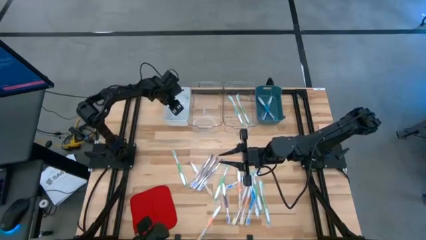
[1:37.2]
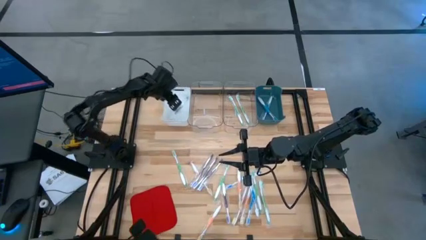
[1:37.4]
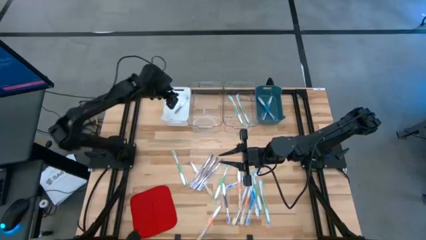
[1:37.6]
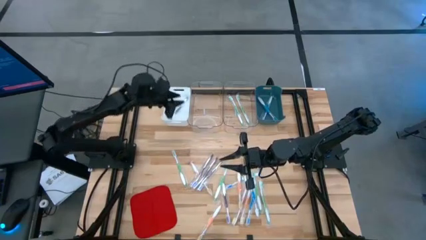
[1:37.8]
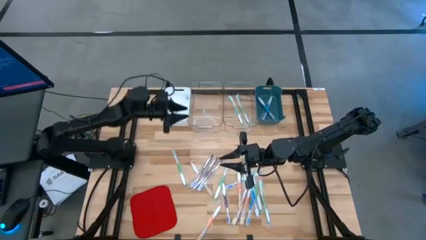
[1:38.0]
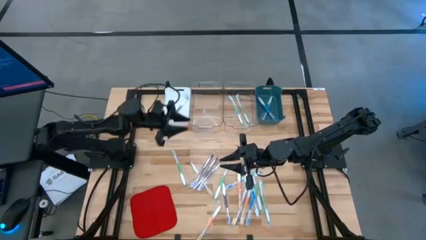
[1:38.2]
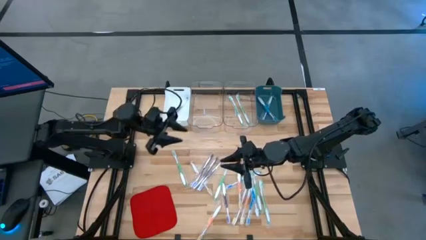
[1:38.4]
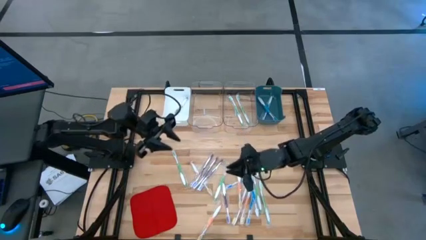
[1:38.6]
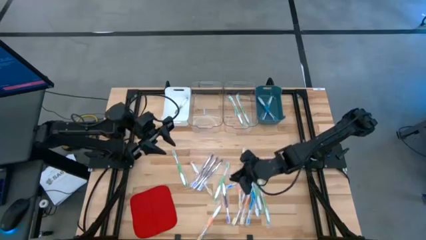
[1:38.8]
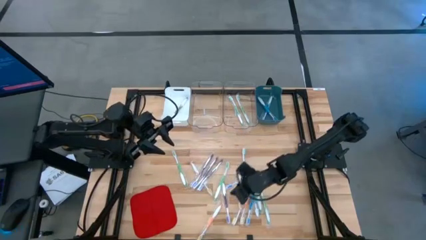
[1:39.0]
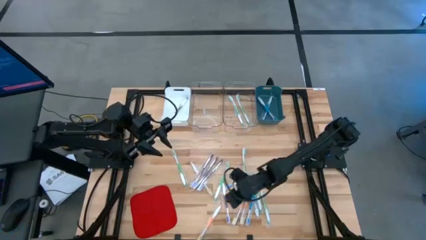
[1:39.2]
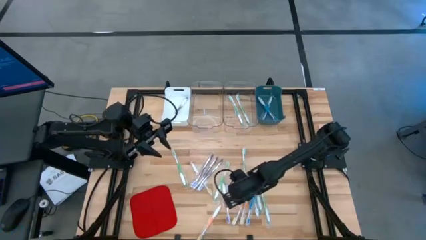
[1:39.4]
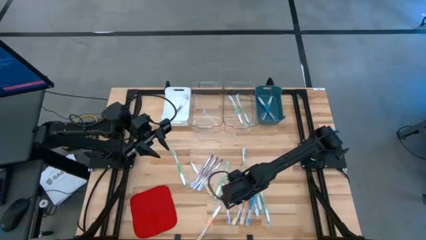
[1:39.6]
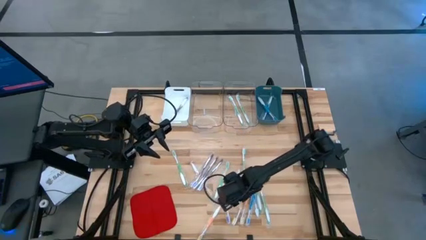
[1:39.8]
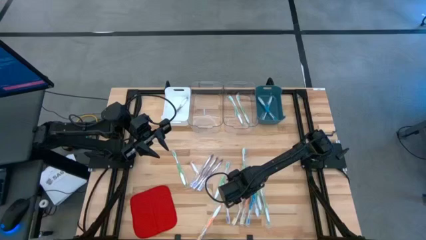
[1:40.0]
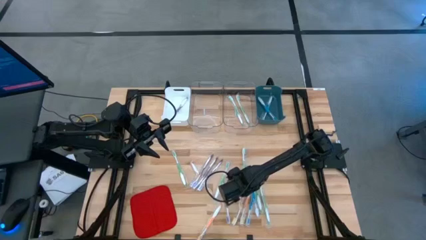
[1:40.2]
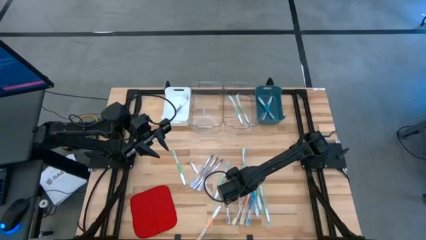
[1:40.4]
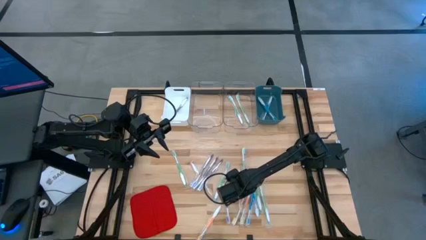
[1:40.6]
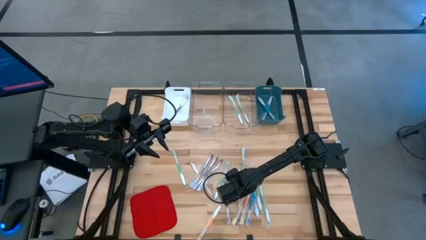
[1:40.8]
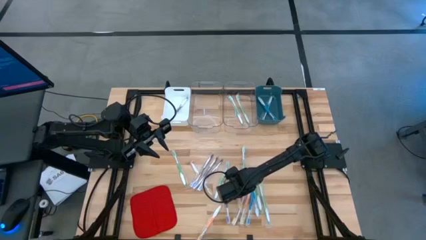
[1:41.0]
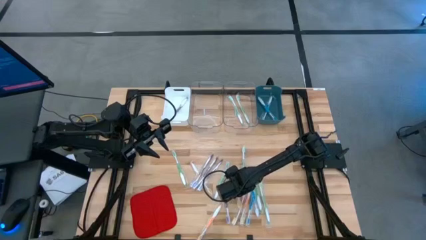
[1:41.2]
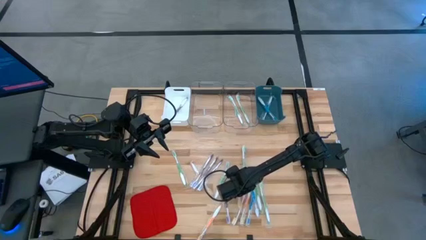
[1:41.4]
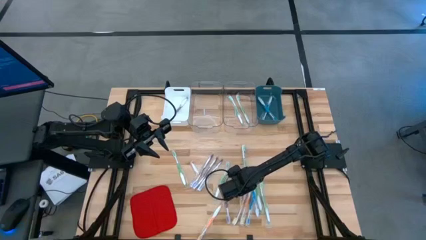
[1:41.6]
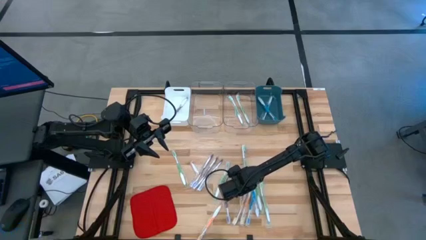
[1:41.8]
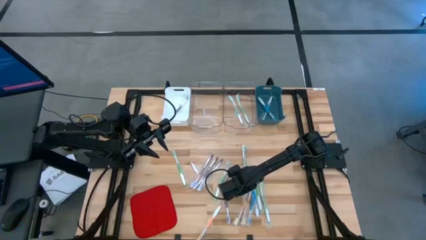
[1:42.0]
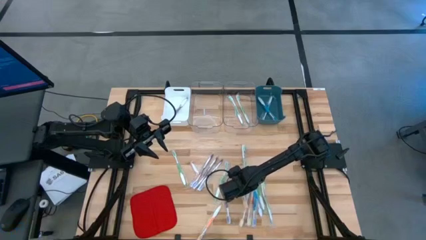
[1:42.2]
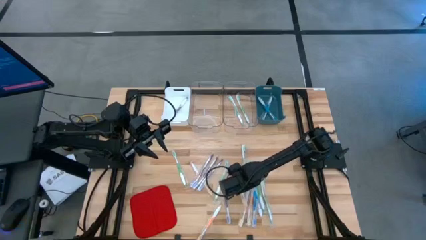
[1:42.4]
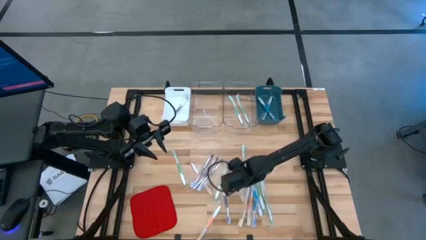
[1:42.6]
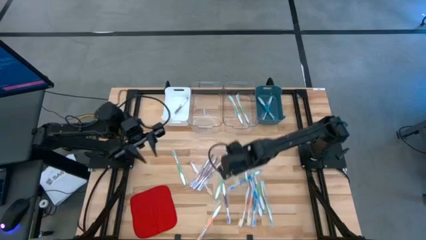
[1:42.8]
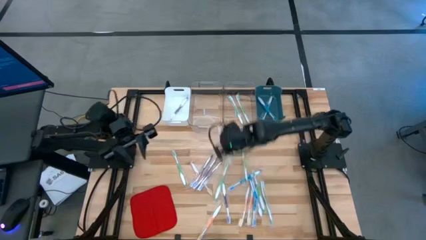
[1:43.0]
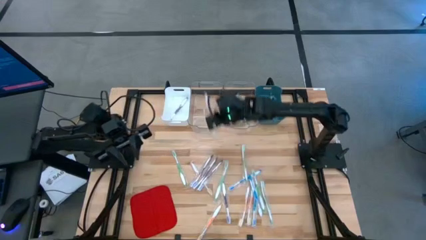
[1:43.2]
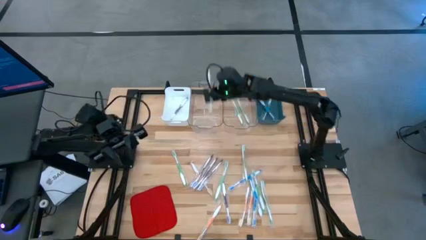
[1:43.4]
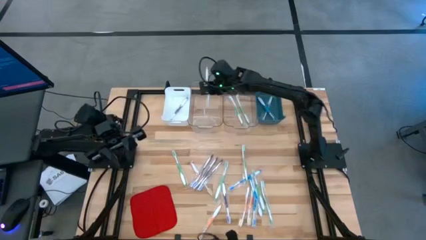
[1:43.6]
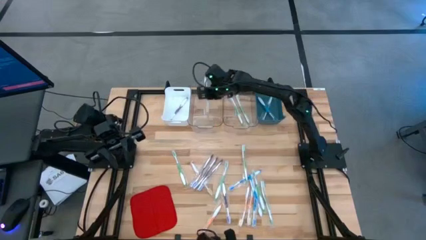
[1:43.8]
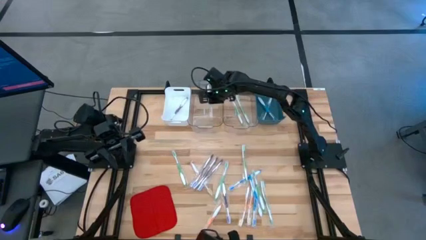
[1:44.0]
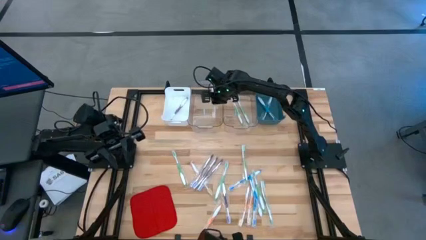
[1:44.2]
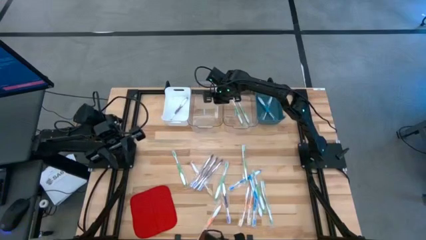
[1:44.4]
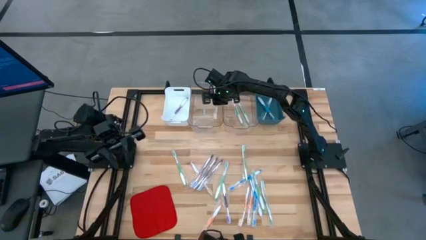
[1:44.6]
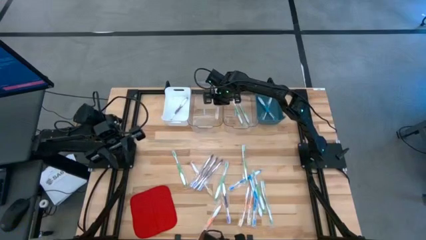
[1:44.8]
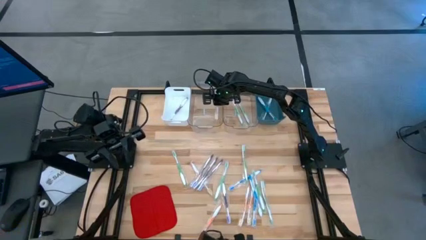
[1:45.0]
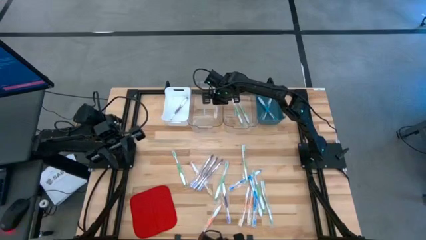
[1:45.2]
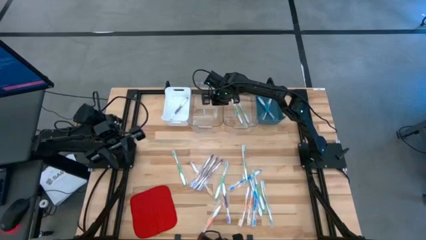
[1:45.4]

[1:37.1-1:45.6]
Task: Pick & Place Toothbrushes
Put the orange toothbrush into the left transparent bin

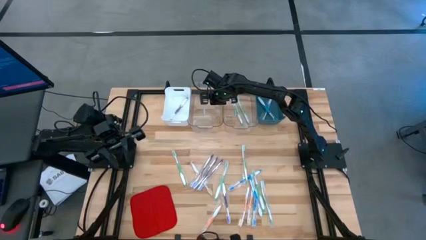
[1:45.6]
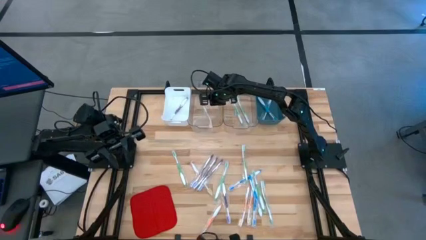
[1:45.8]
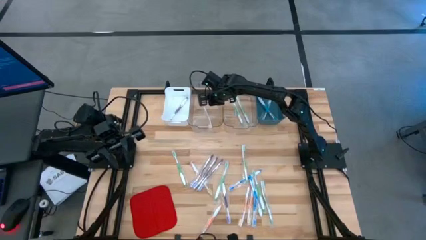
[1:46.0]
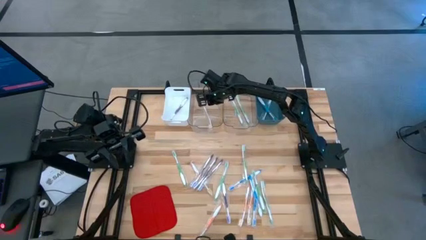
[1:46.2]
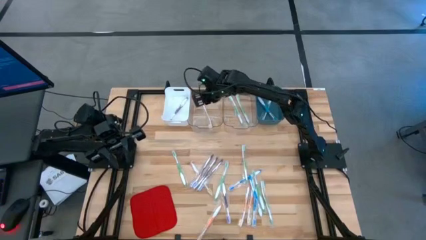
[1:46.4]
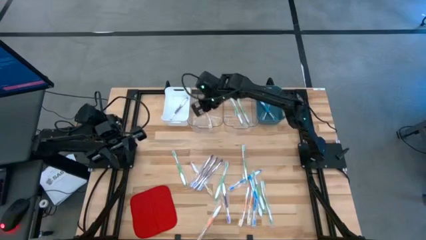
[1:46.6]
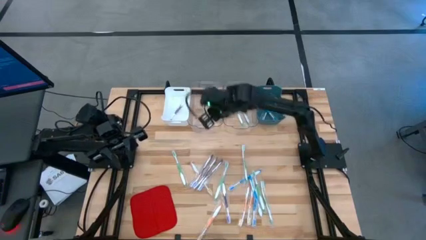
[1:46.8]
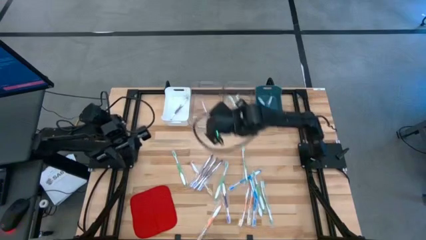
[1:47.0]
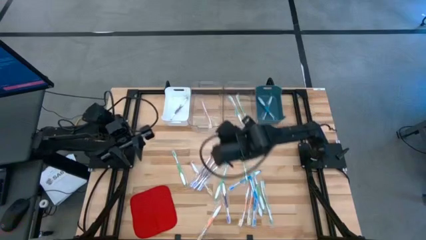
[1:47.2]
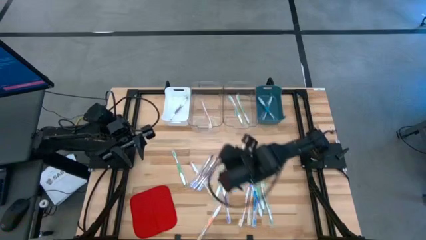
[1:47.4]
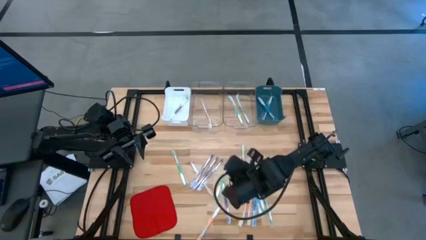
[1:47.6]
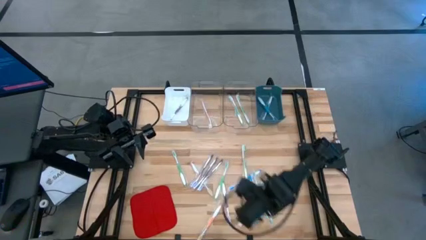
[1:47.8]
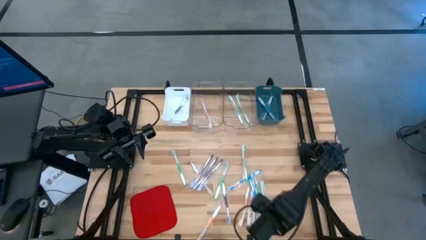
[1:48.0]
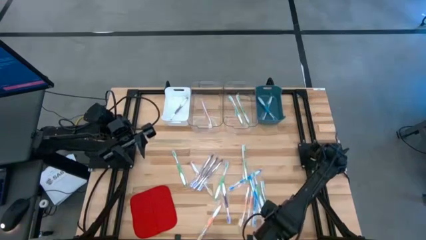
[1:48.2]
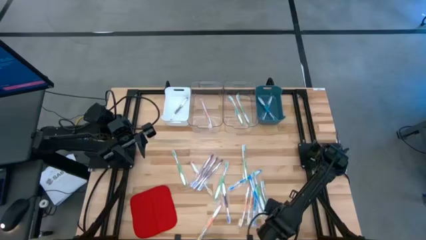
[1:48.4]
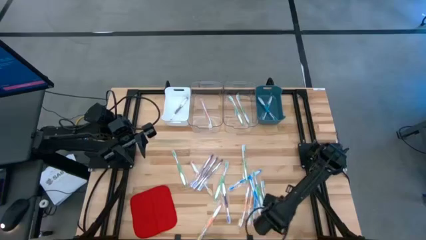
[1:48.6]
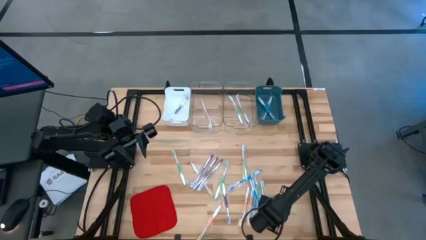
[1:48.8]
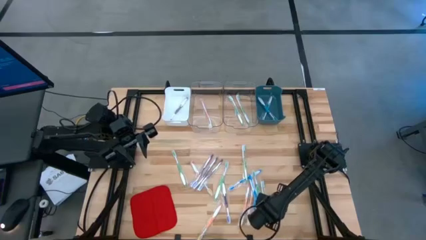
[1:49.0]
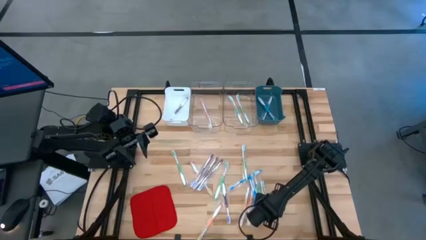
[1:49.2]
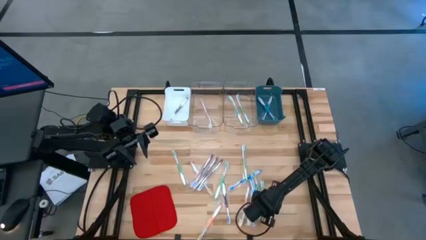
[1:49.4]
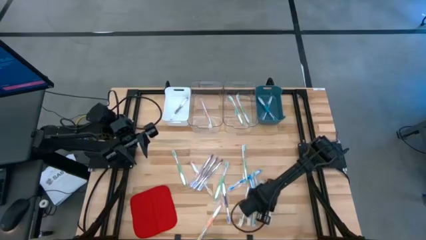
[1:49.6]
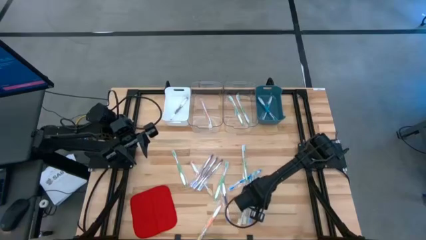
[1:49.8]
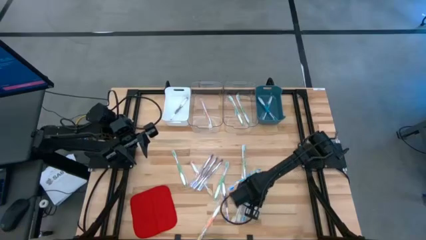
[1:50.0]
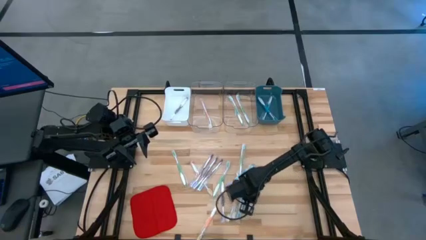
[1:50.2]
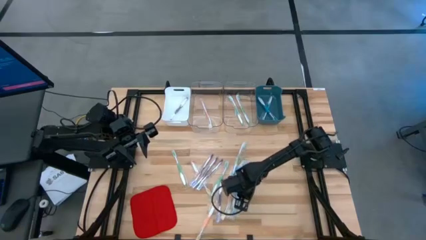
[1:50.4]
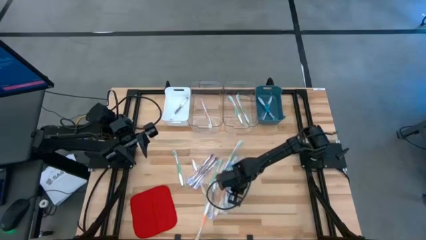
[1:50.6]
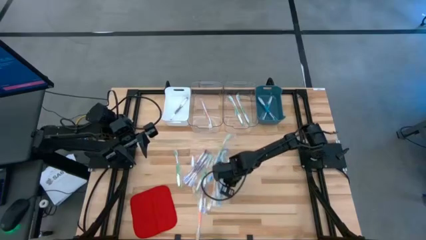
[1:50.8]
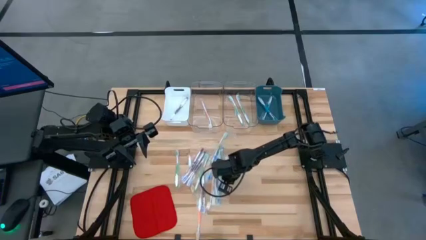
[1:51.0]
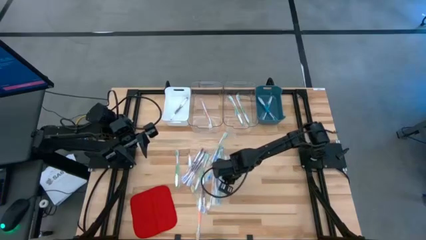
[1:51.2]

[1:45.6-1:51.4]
Move the colored toothbrushes from the right to the center of the table
